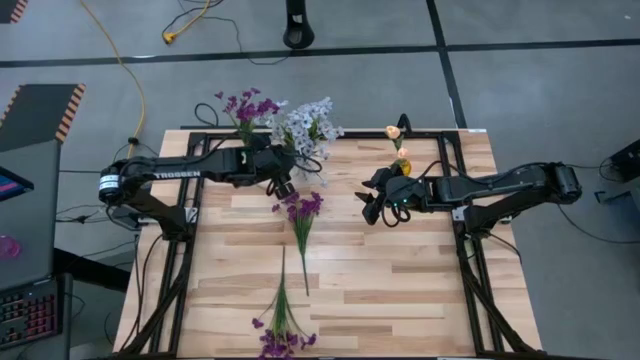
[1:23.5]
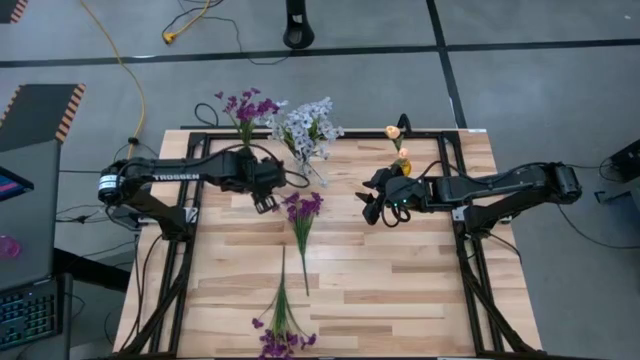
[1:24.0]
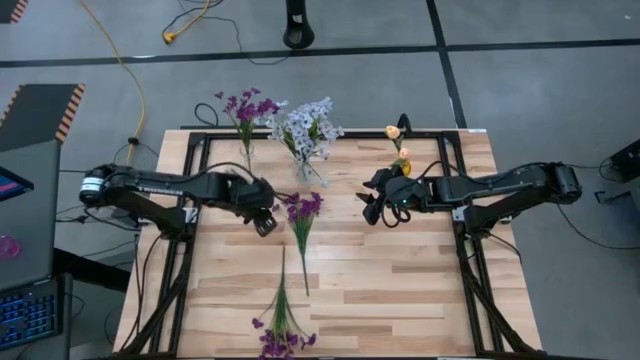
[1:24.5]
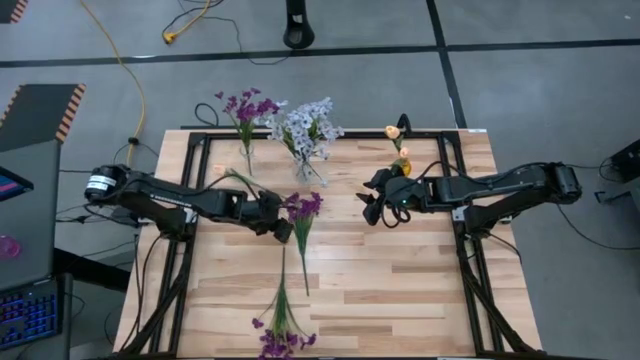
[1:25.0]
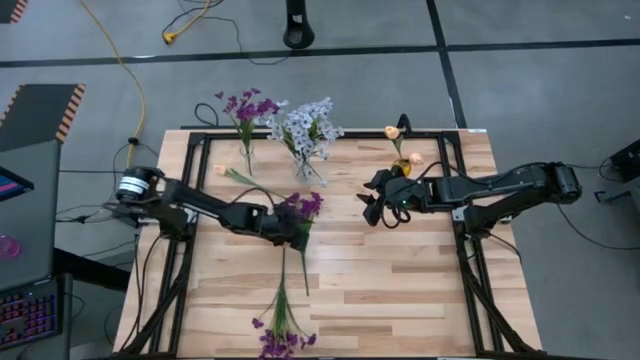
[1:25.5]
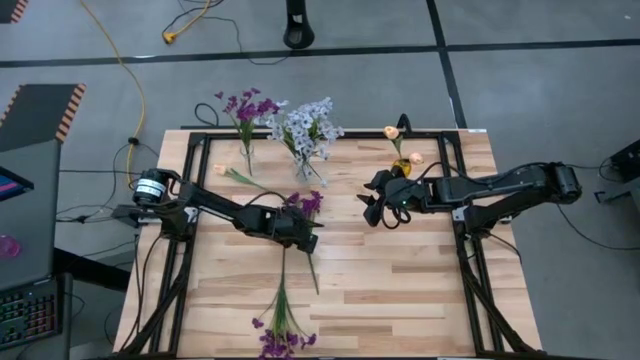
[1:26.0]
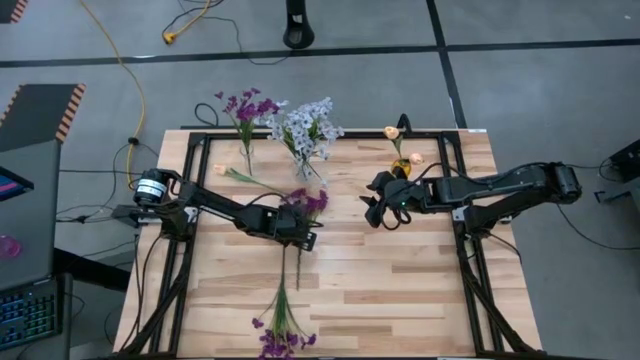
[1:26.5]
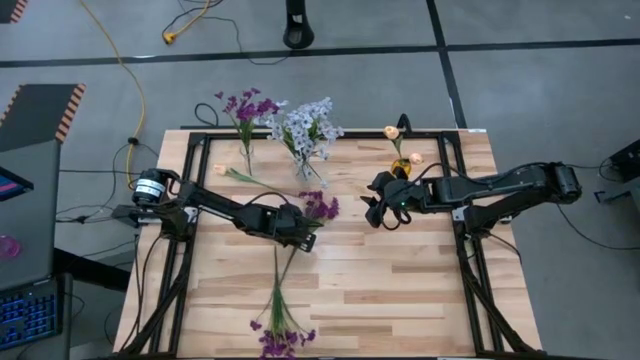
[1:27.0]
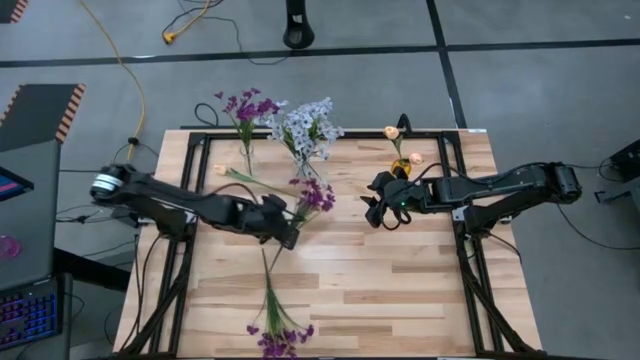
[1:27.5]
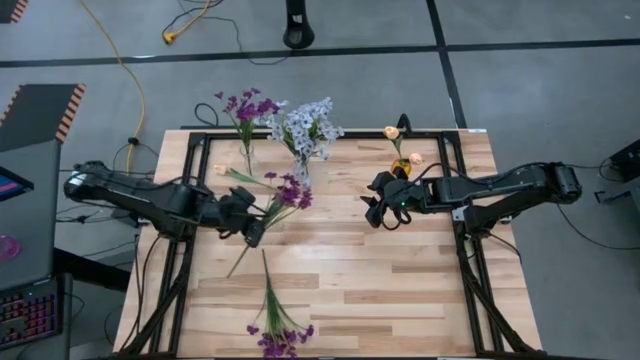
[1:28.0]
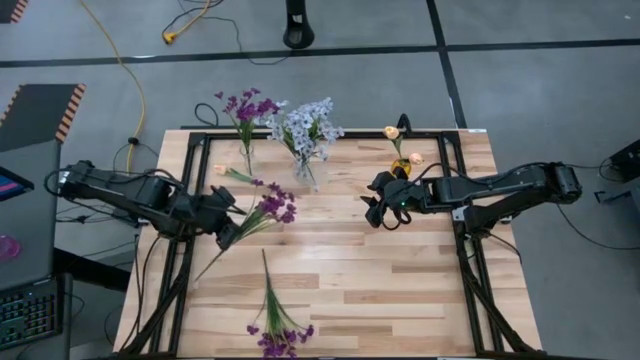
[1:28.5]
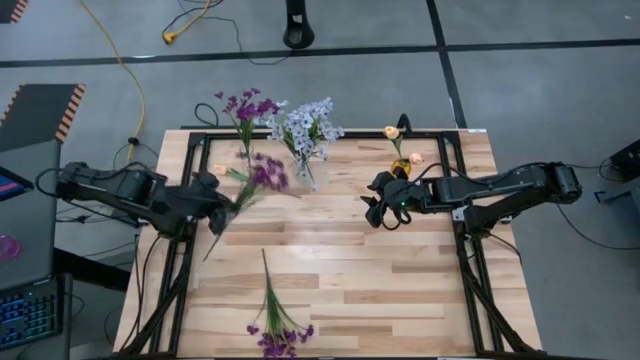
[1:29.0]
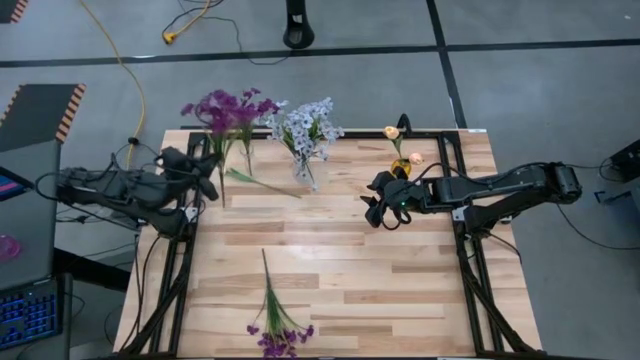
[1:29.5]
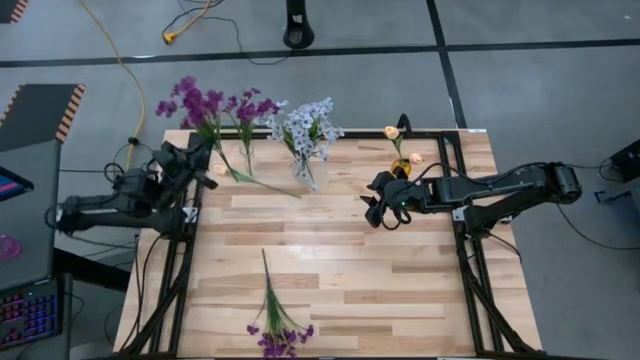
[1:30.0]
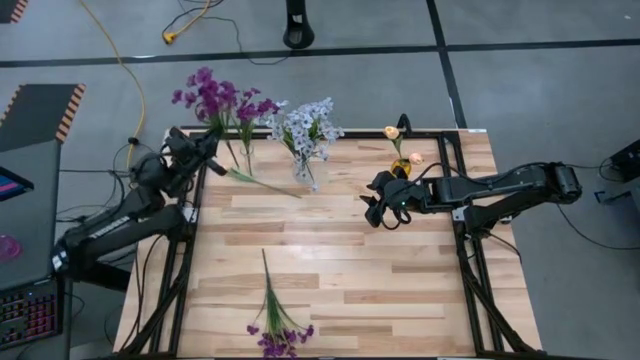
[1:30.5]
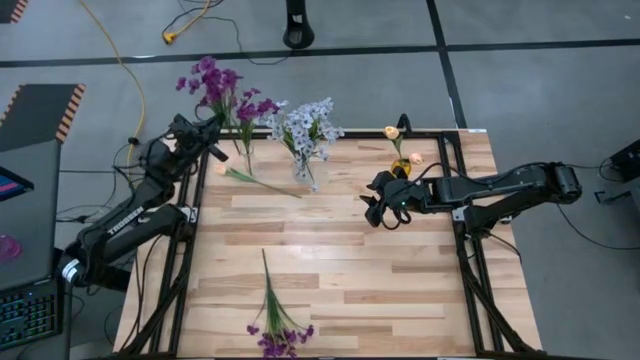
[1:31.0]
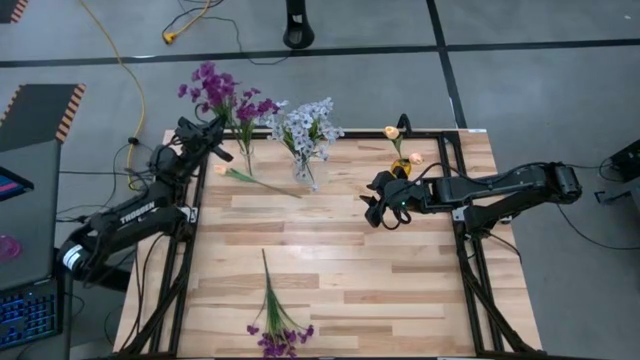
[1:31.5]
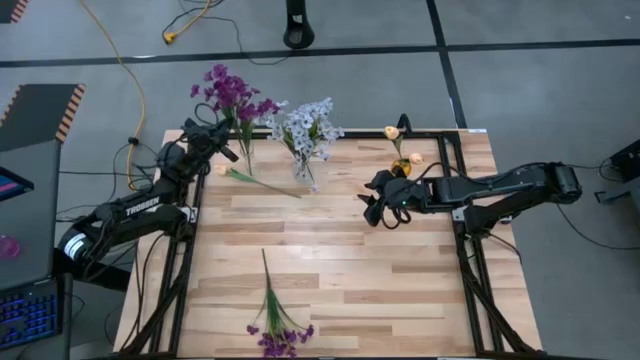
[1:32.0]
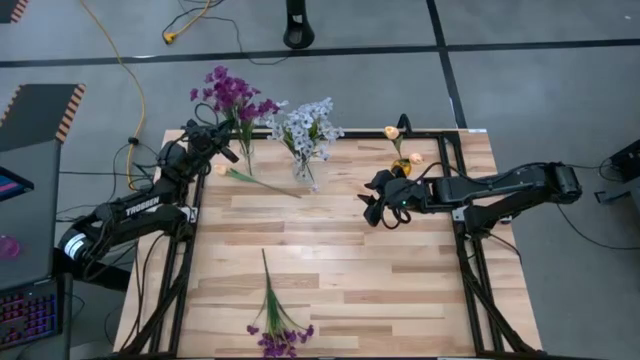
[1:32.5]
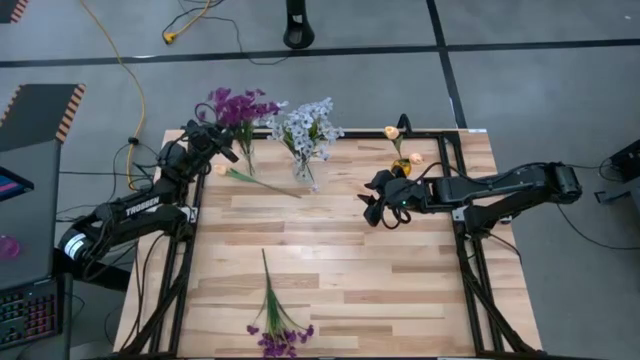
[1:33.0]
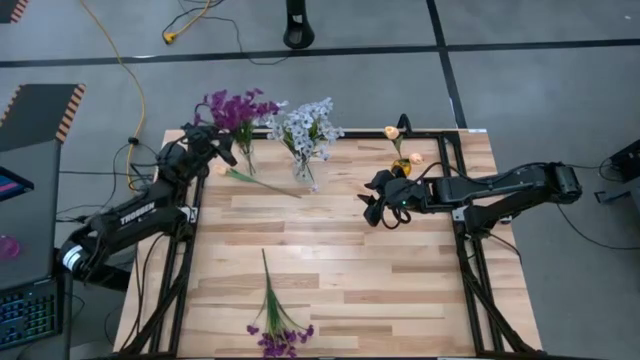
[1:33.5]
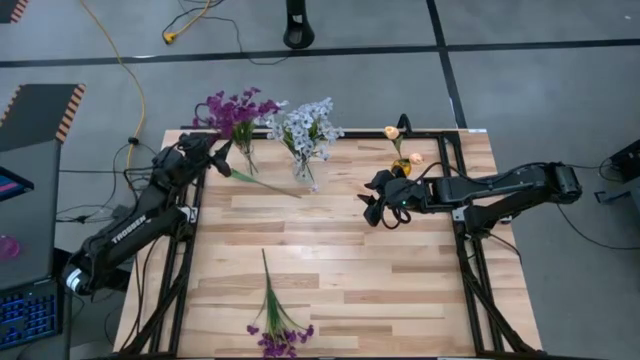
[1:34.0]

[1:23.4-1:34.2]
Task: Sort flowers into vase by color
Put the top violet flowers into the left transparent vase

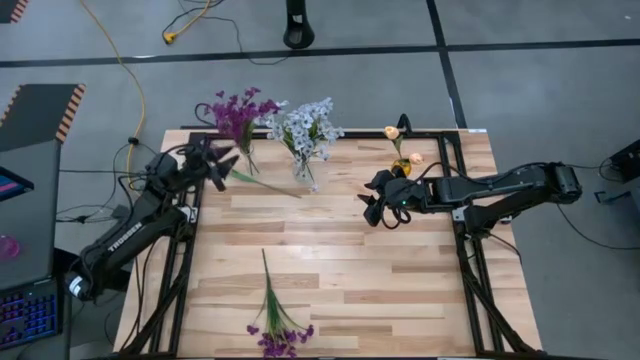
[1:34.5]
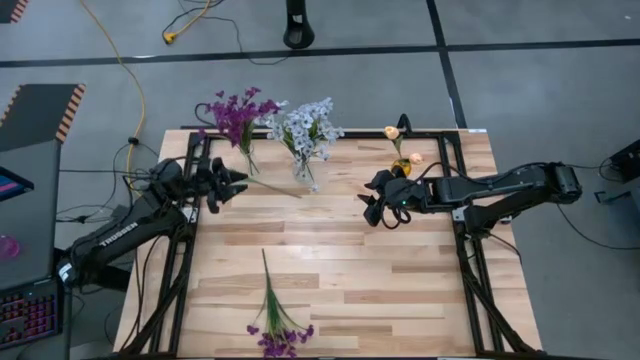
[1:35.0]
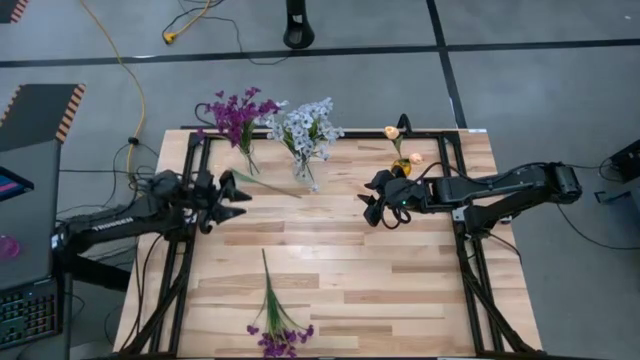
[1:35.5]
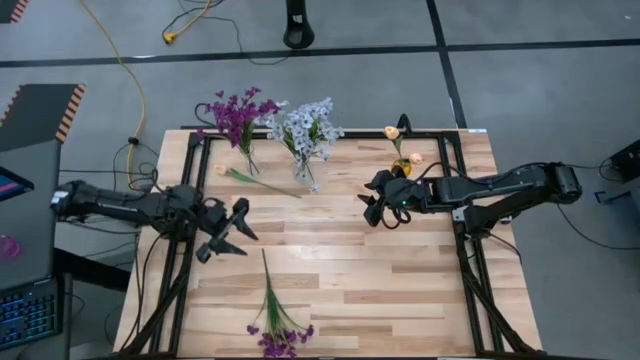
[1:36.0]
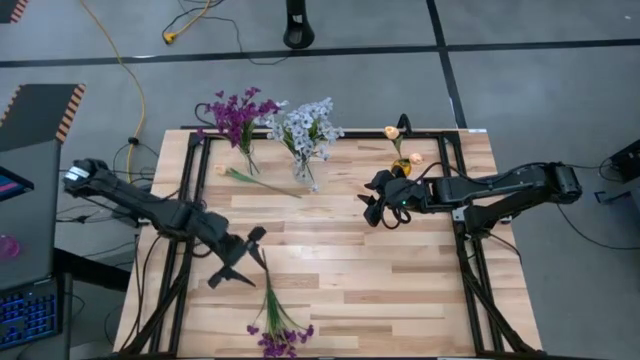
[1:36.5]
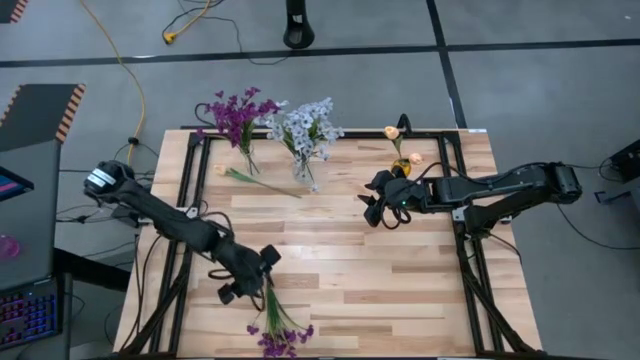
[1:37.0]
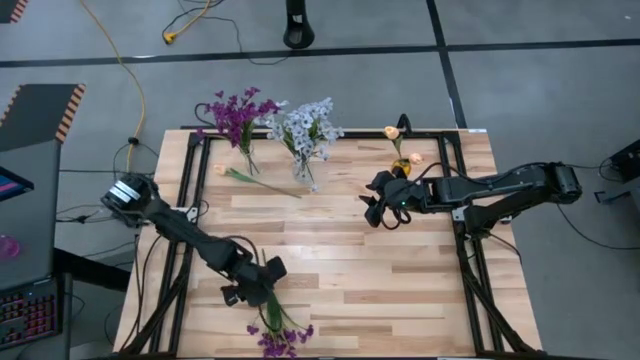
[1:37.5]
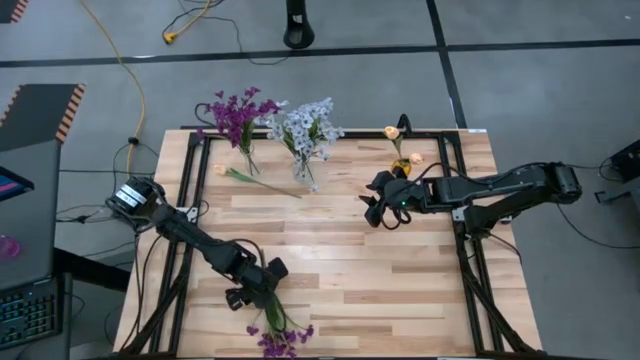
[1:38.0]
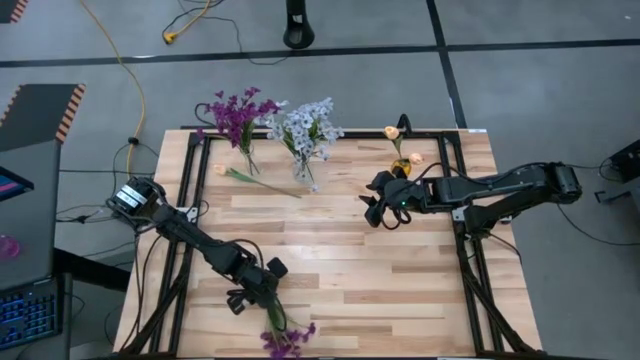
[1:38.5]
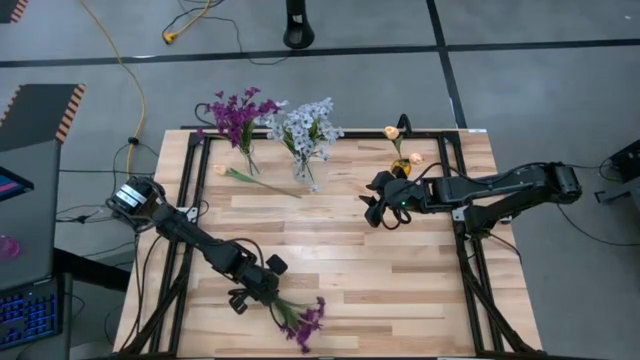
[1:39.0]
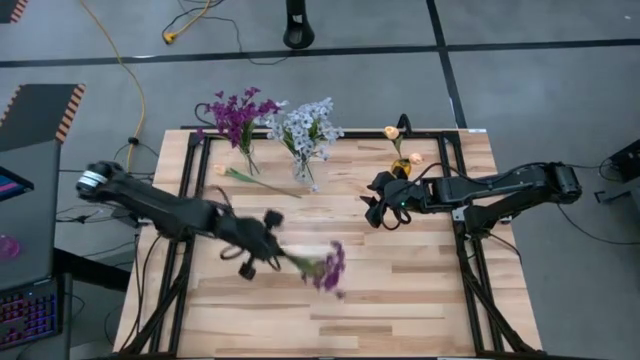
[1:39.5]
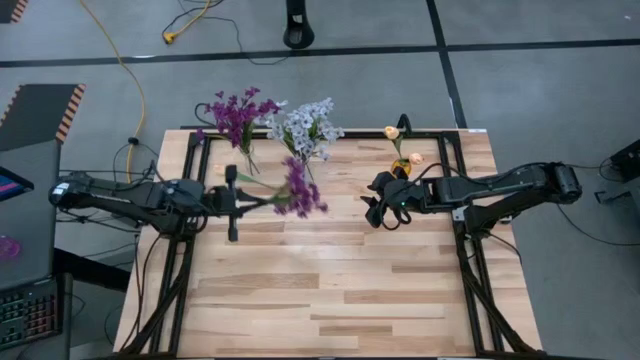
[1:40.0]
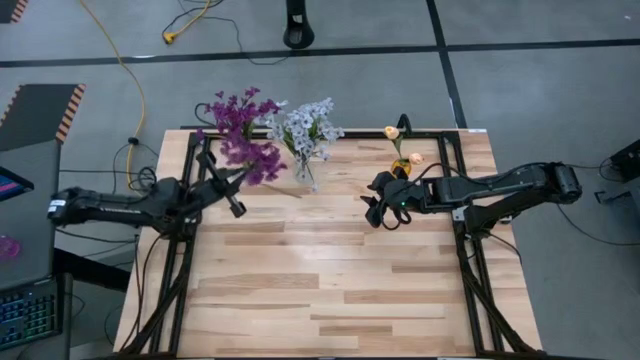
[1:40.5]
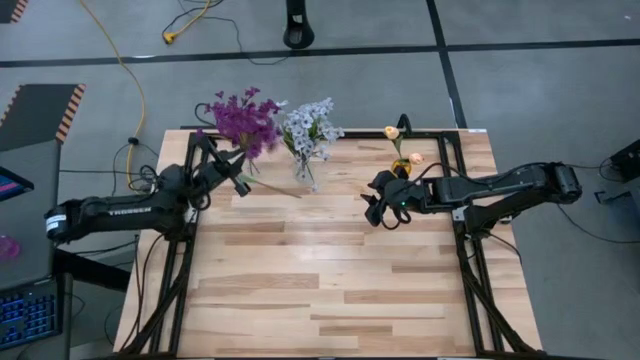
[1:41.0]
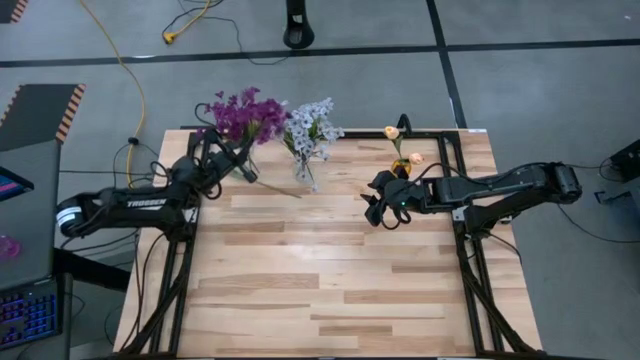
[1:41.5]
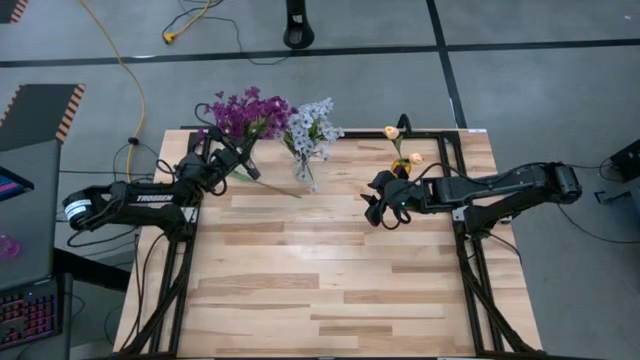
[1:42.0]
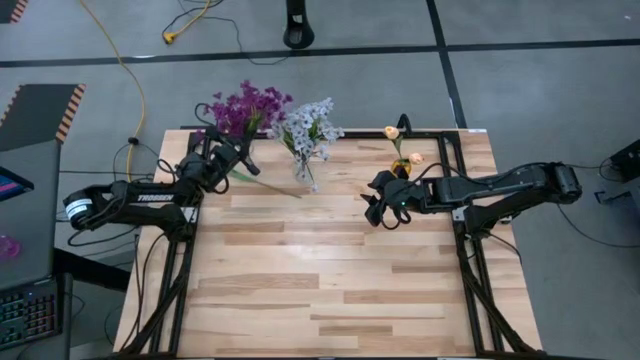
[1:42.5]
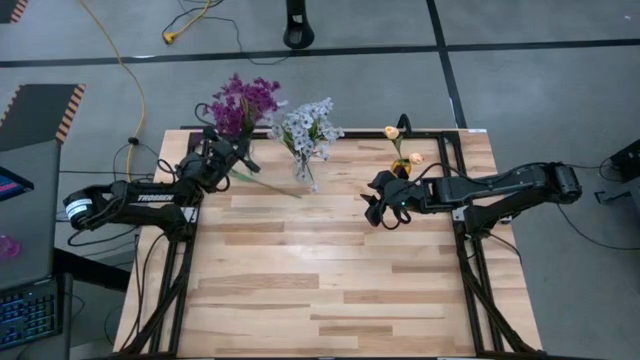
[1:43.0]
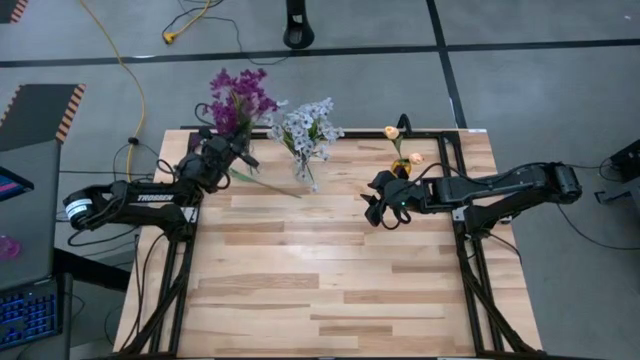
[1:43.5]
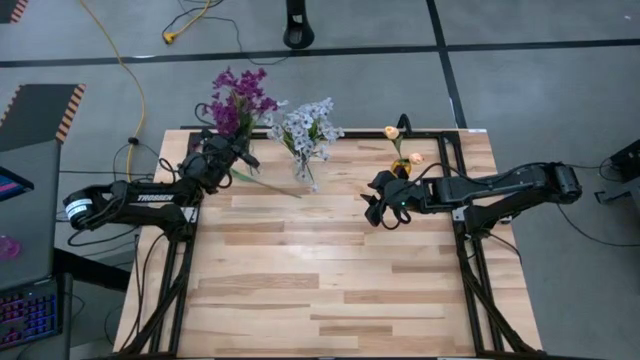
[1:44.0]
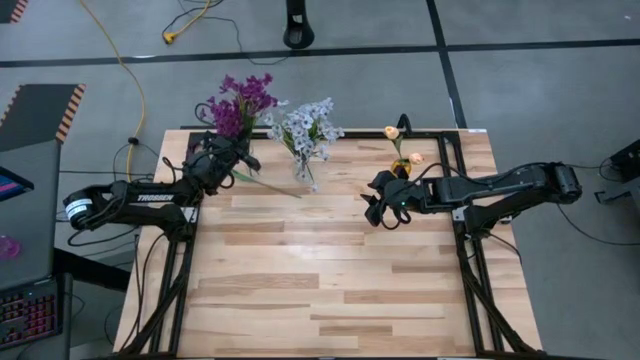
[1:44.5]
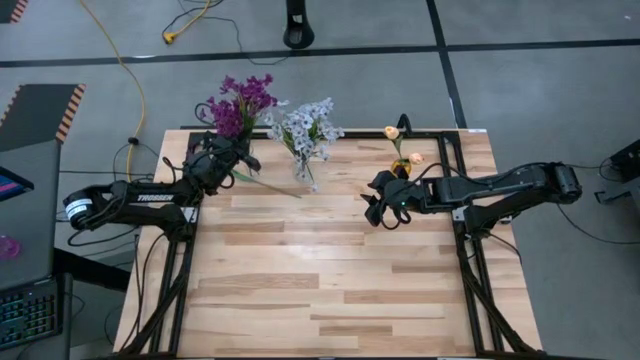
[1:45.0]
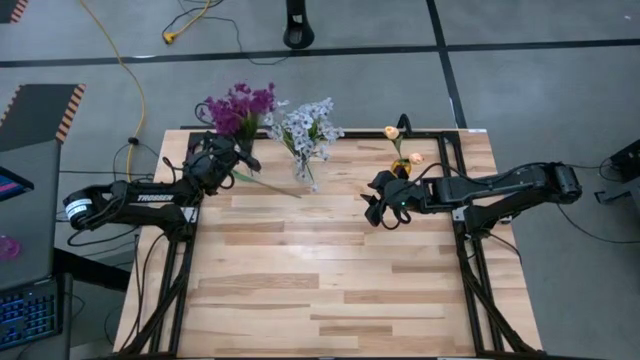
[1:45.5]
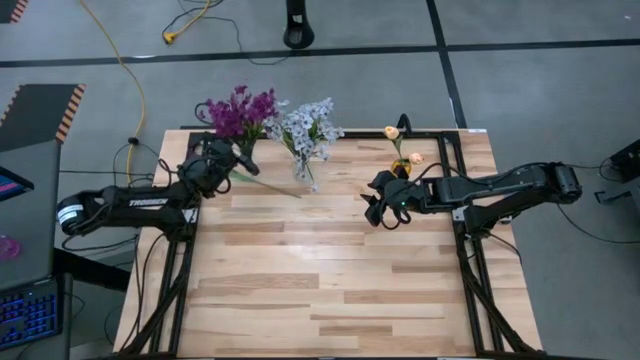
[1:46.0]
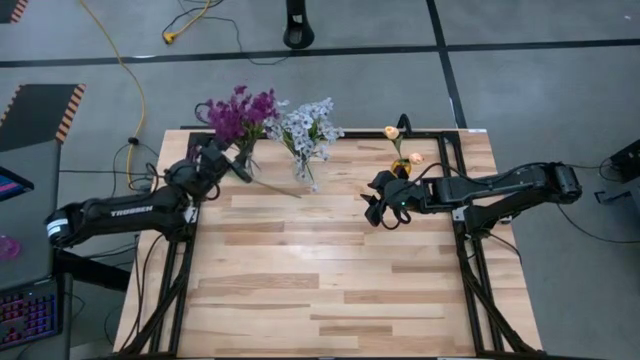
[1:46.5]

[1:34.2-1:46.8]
Put the violet flowers into the left transparent vase
